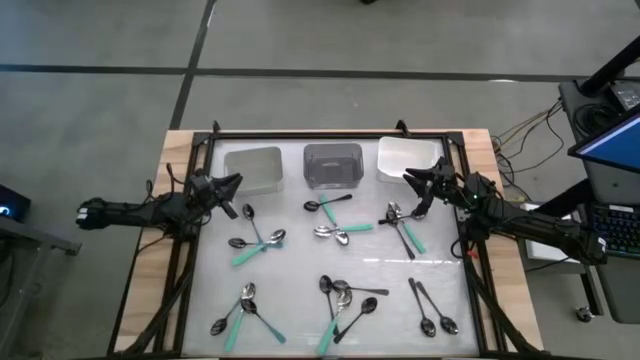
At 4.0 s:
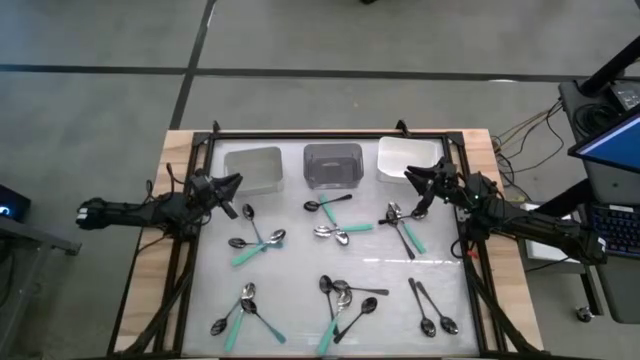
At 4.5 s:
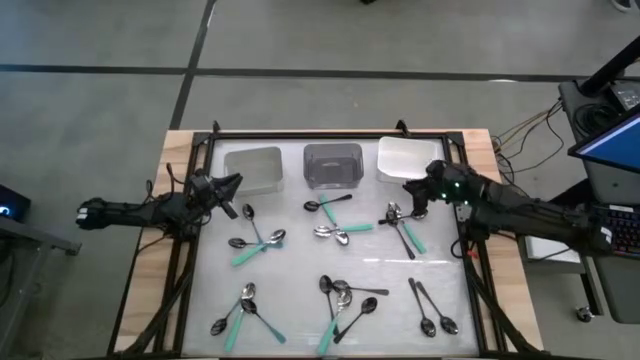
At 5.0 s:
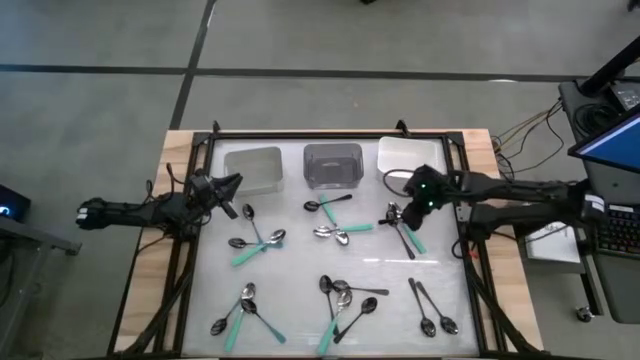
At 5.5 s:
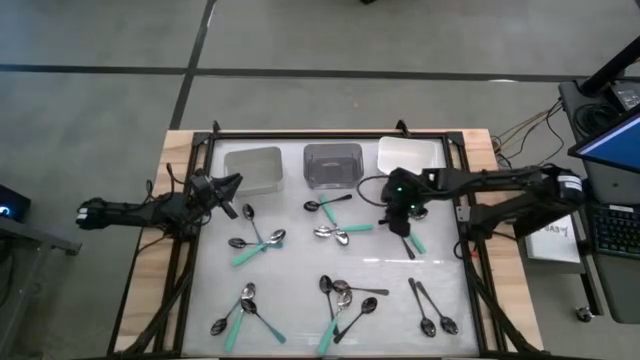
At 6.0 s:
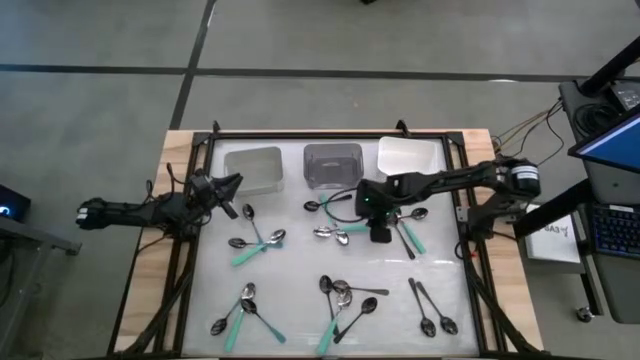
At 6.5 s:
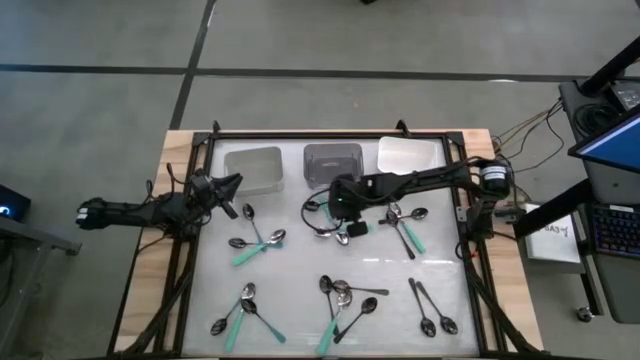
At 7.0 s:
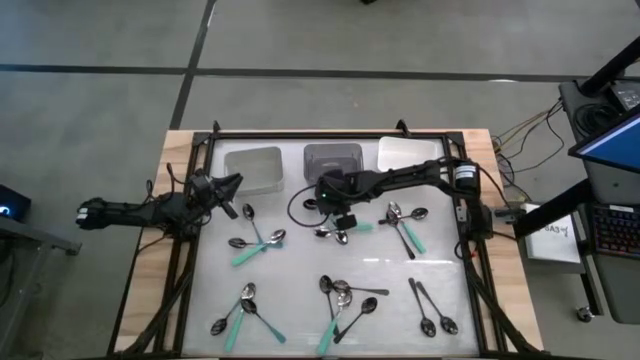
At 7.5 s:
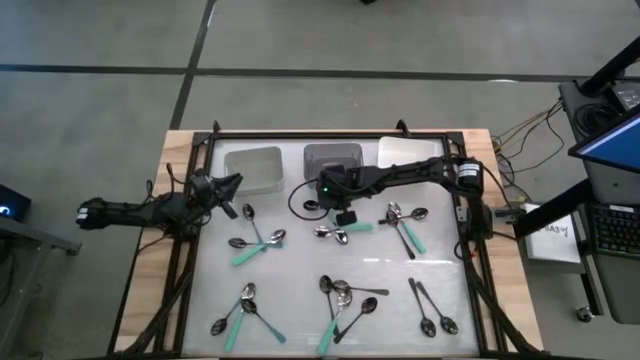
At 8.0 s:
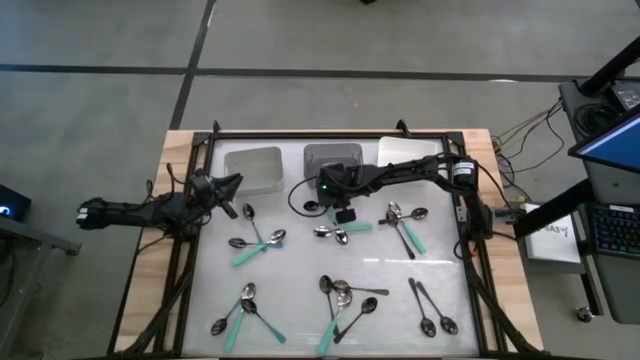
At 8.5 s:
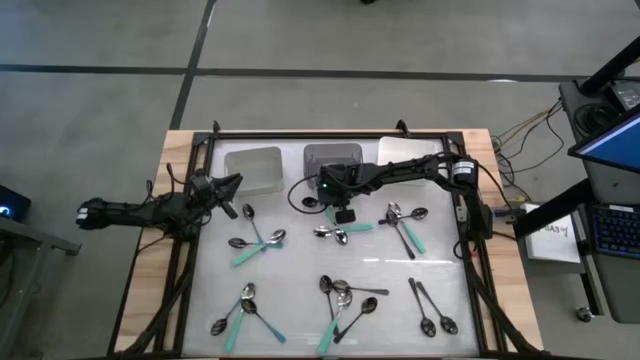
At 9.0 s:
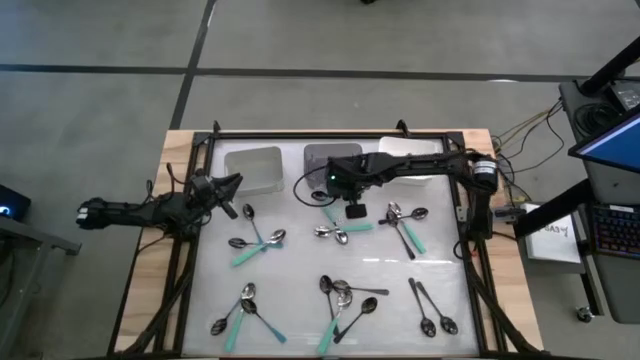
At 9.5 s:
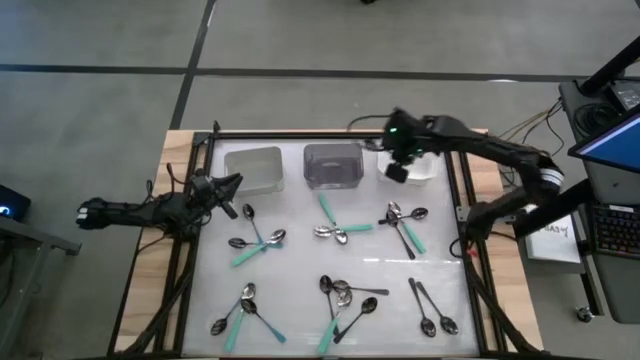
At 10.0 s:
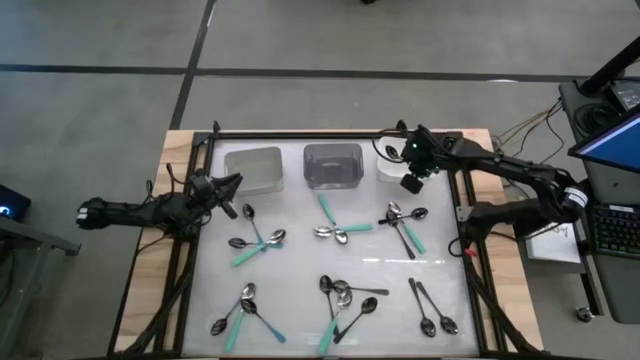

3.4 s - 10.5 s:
Task: Sort silverware by color (type)
Put the black spoon into the white bin

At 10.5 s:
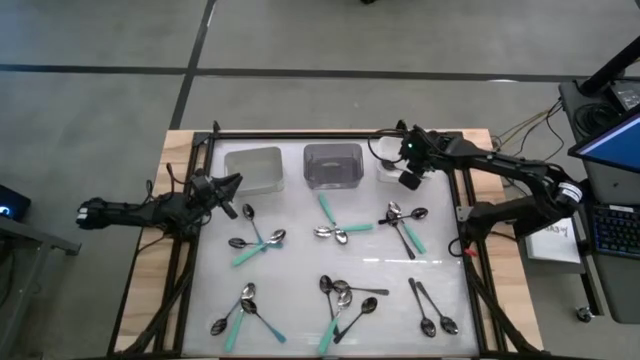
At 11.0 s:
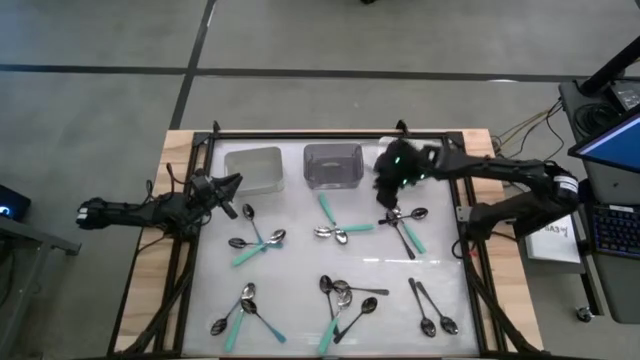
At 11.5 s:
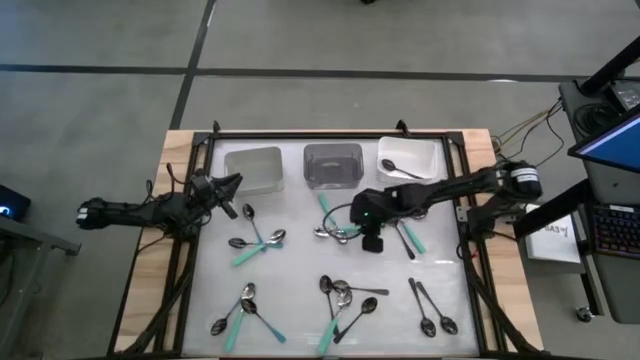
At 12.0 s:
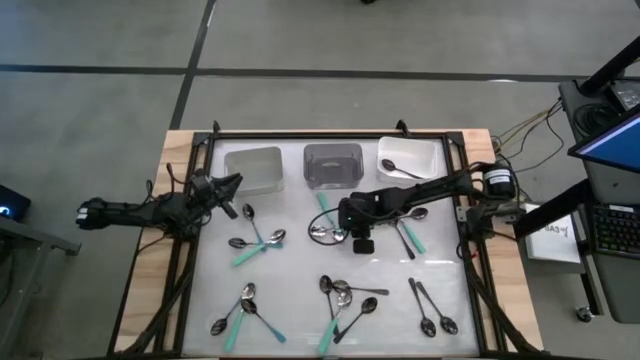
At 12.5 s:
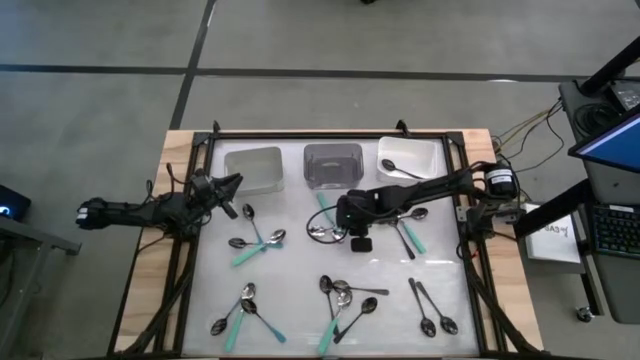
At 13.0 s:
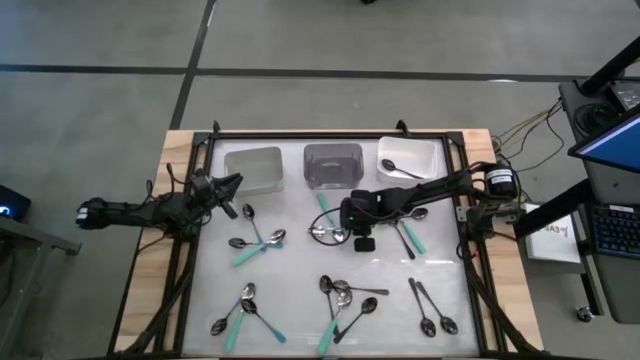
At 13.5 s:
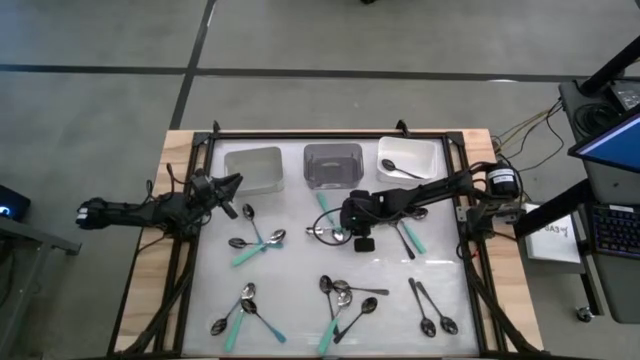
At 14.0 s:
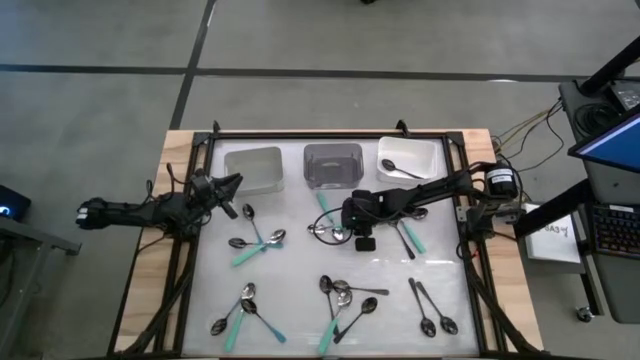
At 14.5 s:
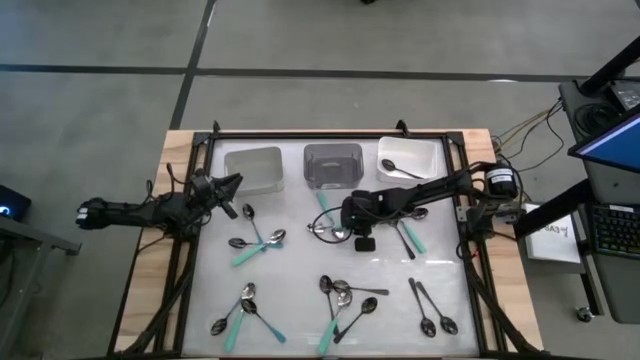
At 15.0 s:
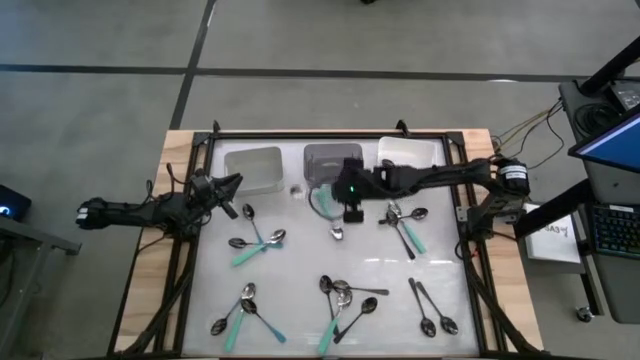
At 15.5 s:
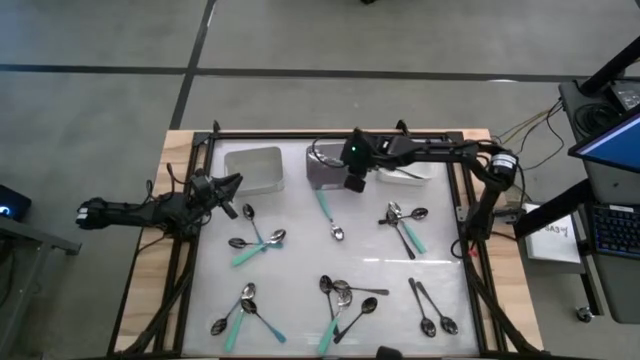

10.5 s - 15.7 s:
Put the green spoon into the black bin

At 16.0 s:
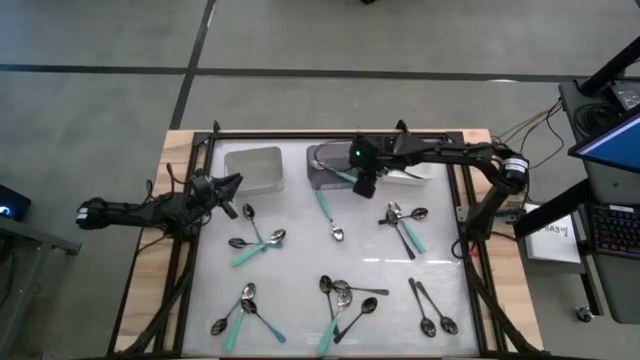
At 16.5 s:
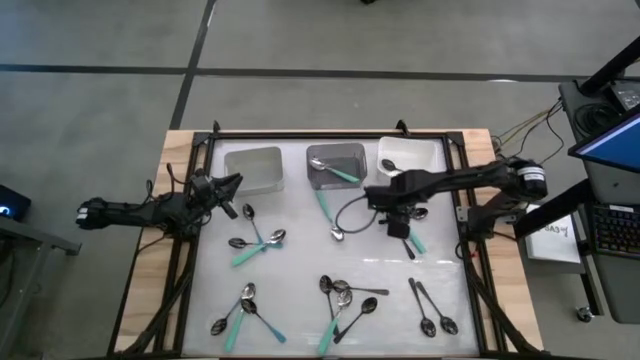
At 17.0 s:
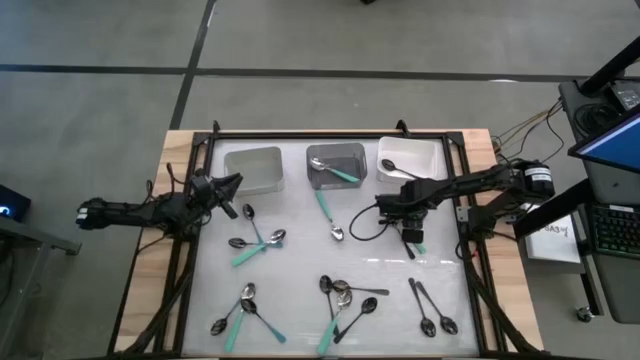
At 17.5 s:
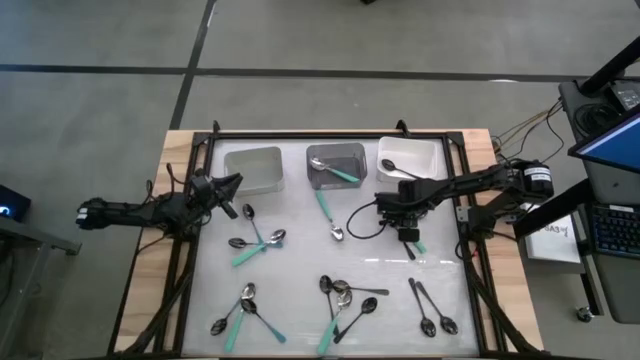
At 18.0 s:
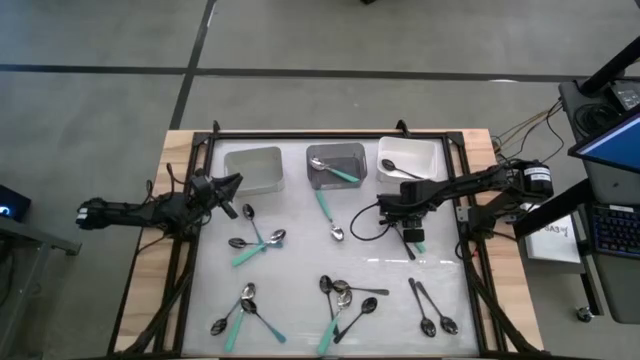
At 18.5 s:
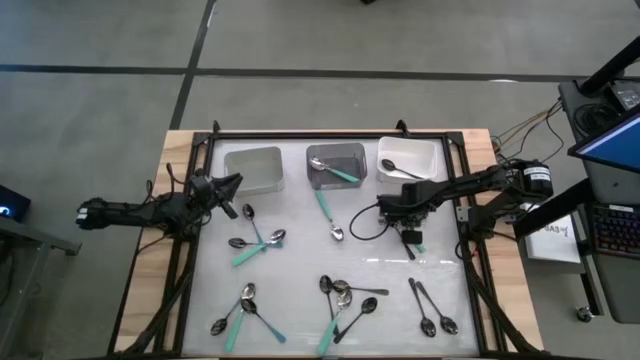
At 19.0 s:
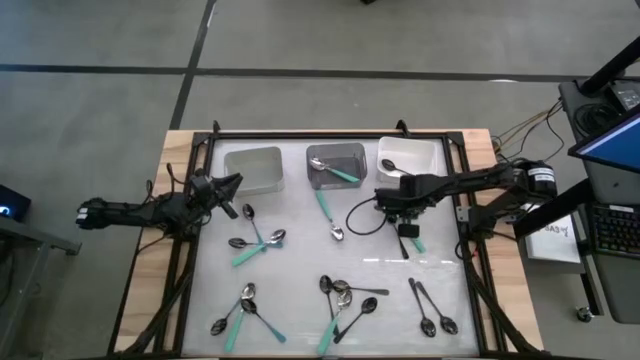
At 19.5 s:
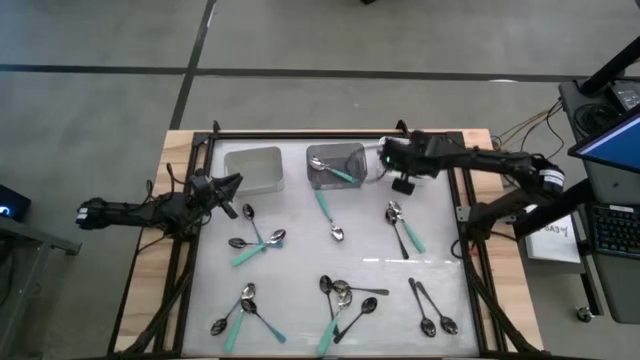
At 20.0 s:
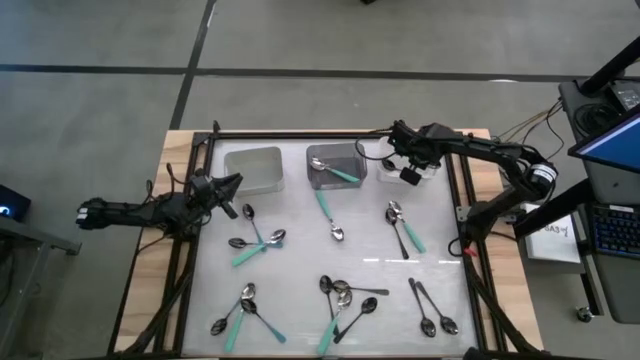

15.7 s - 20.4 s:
Put the black spoon into the white bin

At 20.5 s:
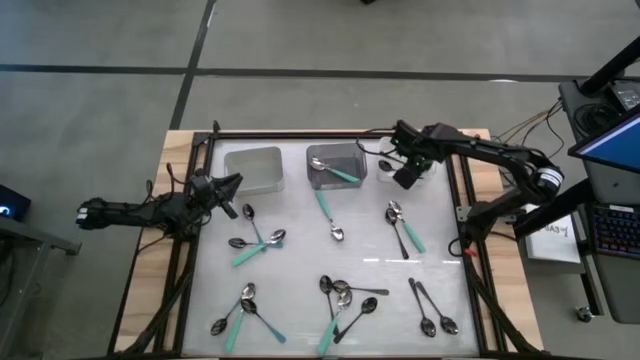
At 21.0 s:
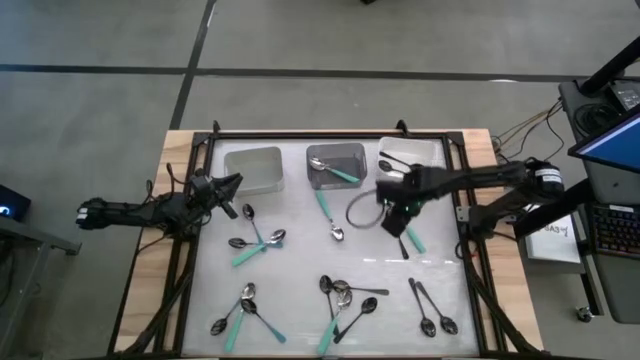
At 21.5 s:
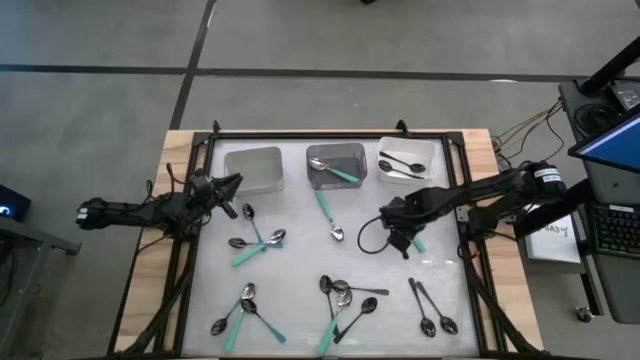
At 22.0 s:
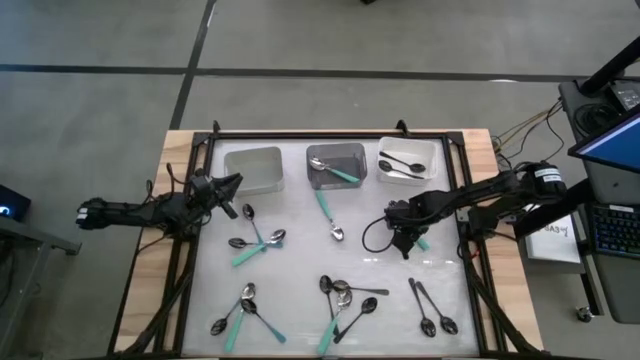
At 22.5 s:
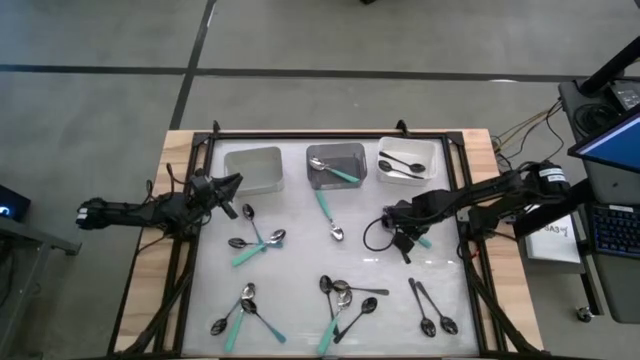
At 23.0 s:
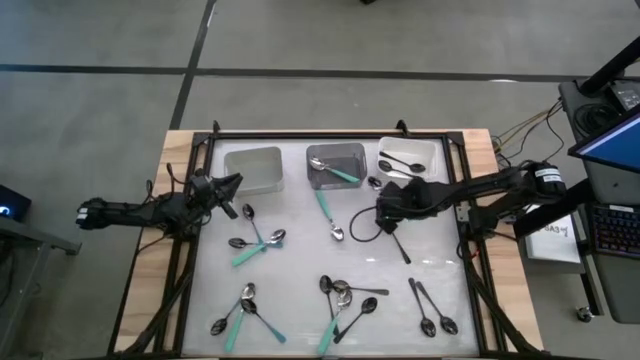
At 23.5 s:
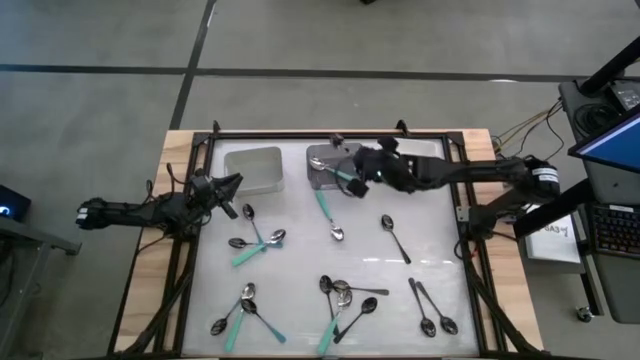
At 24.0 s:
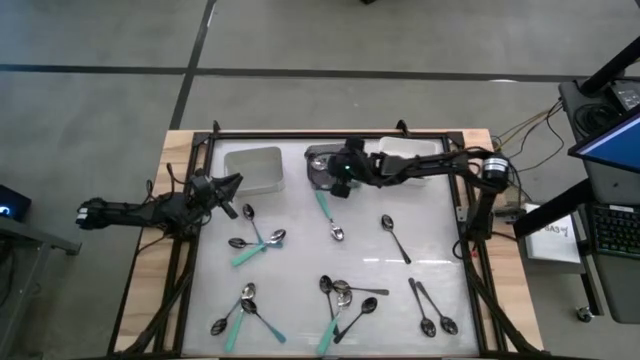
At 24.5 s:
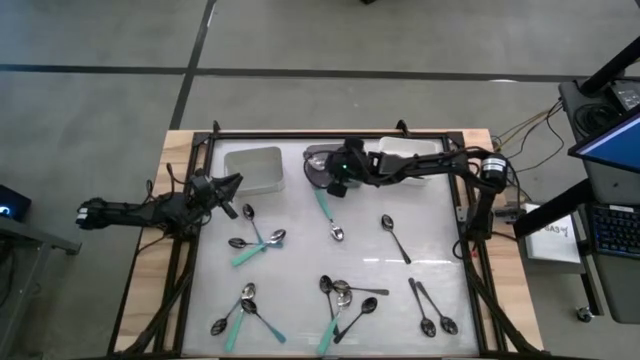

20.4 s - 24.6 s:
Put the green spoon into the black bin
